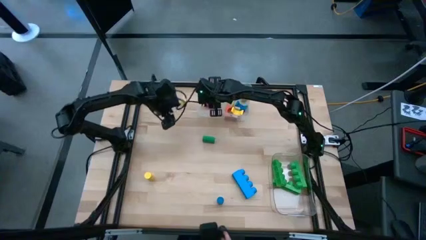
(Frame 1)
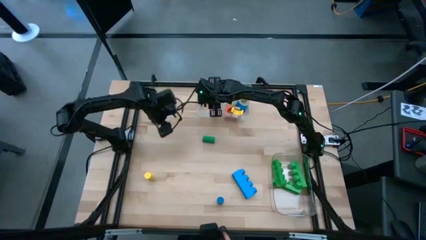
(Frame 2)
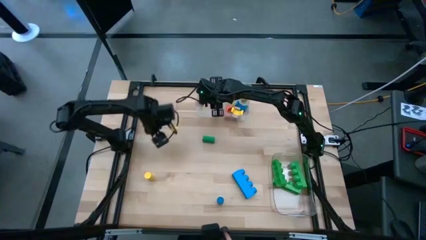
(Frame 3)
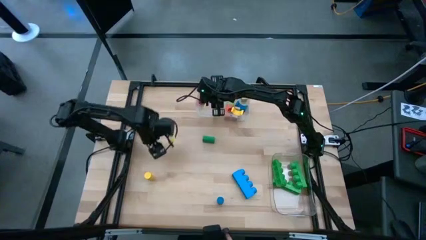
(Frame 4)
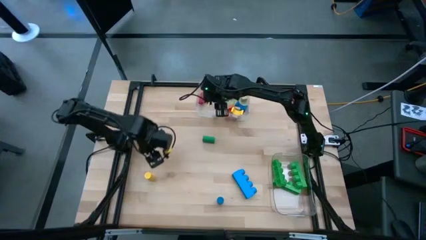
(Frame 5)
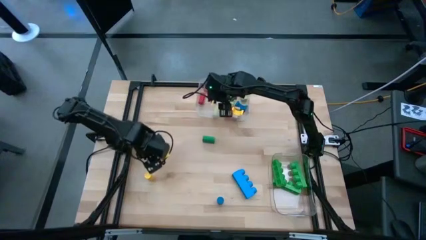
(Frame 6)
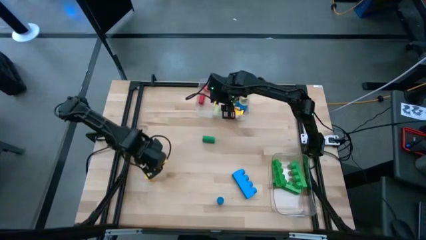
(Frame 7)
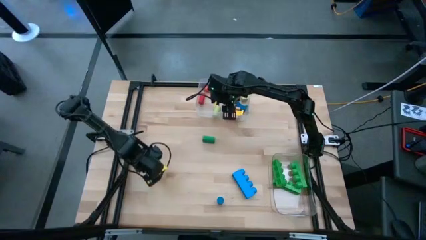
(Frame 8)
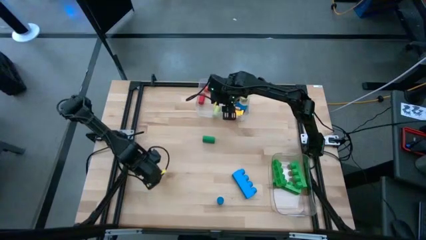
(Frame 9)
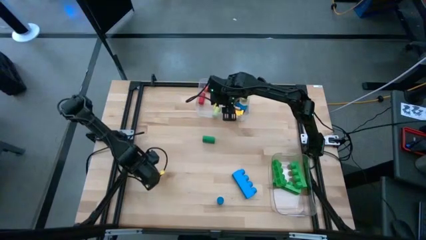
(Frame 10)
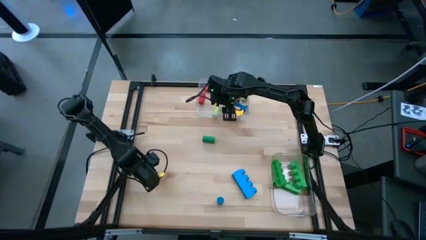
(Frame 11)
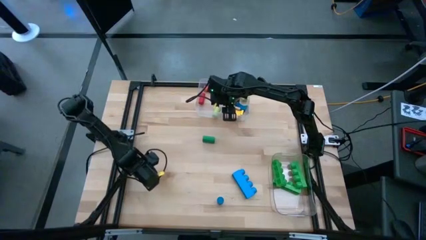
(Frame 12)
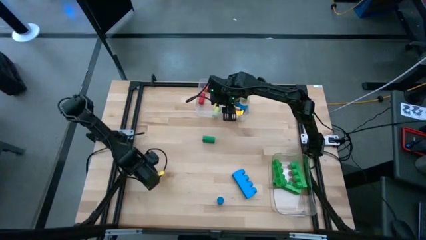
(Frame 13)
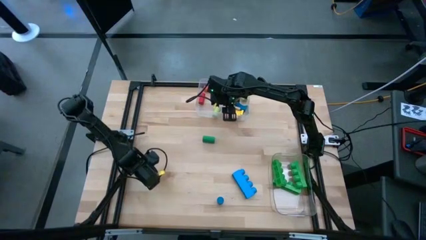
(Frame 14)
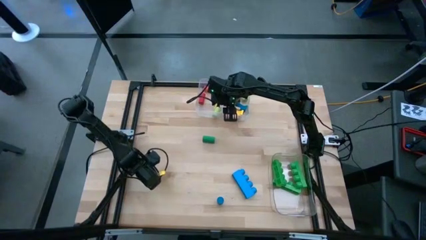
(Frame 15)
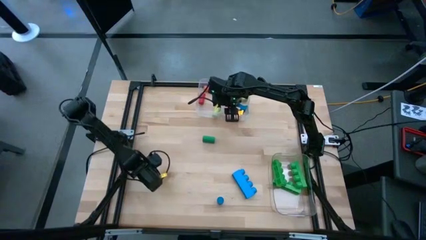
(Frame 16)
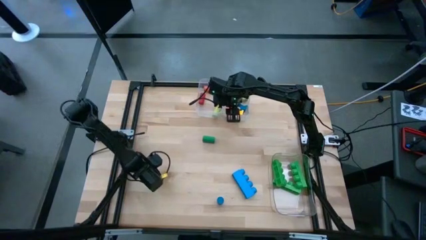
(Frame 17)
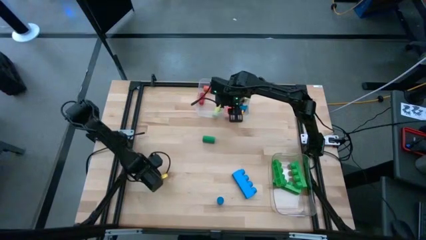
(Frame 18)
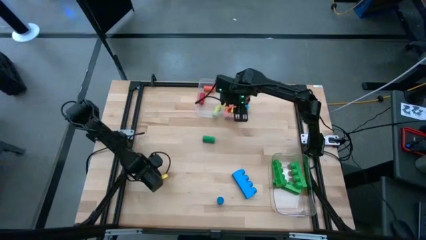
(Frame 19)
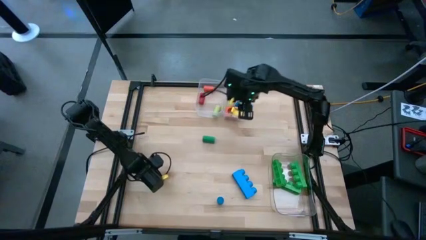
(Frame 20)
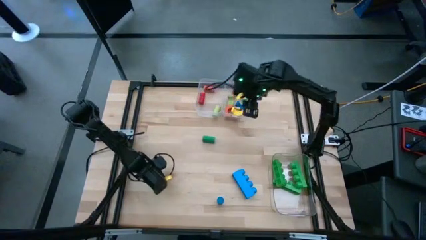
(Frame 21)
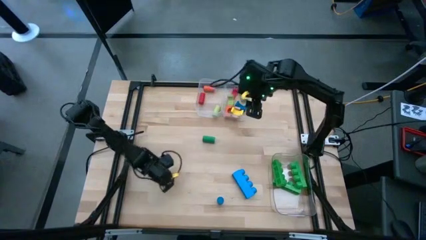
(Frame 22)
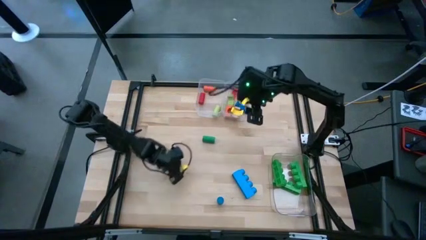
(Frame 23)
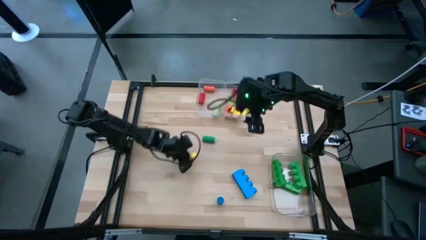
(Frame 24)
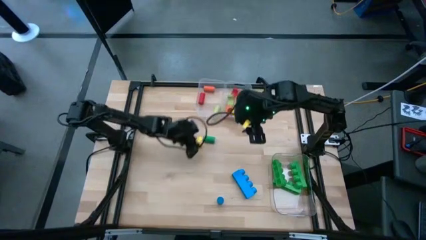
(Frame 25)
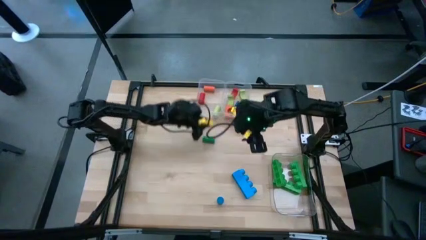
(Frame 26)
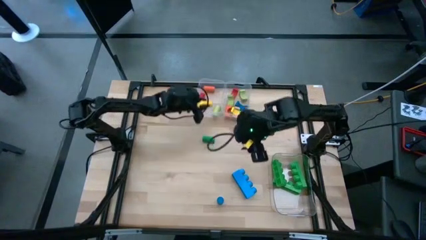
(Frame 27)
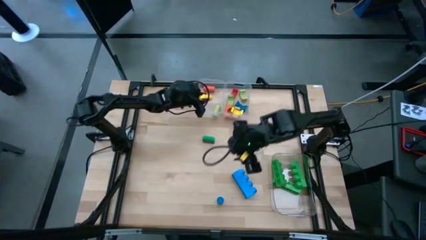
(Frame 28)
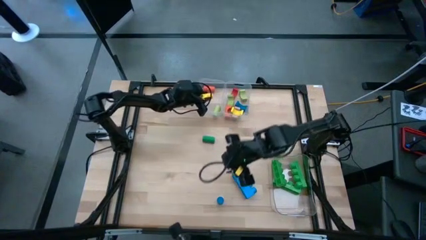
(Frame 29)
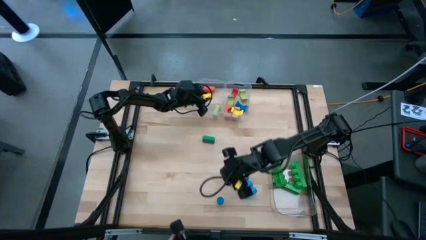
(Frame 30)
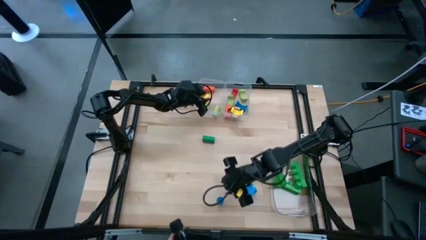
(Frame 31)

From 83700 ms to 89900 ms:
Task: Sort blocks by size
Put the yellow cylindrical block into the left transparent bin

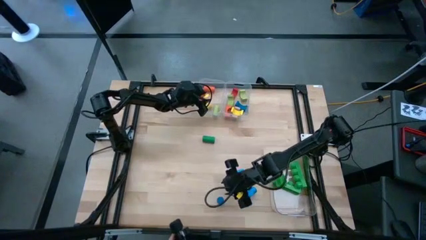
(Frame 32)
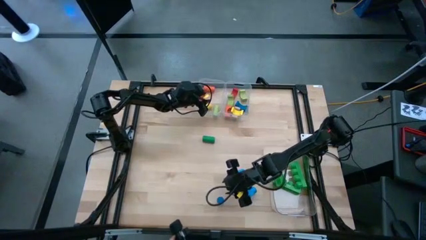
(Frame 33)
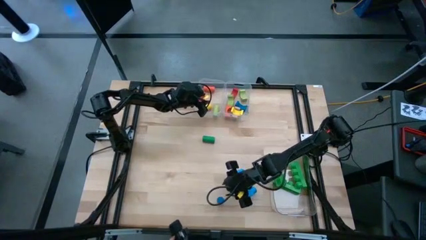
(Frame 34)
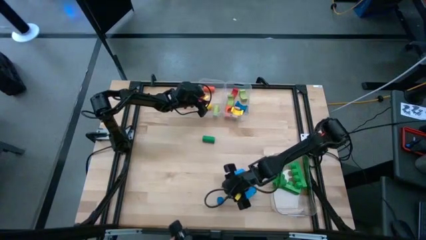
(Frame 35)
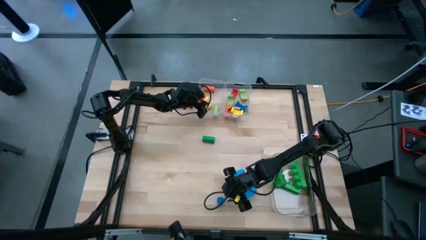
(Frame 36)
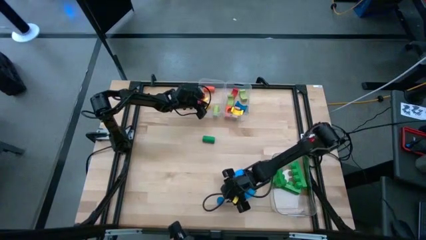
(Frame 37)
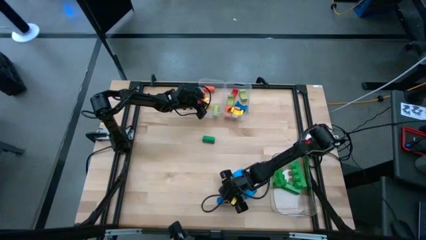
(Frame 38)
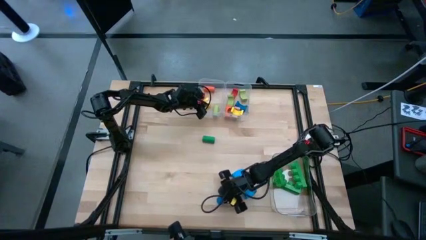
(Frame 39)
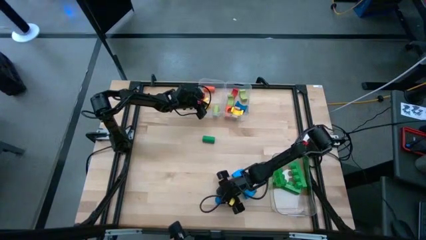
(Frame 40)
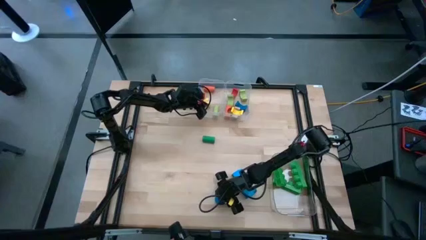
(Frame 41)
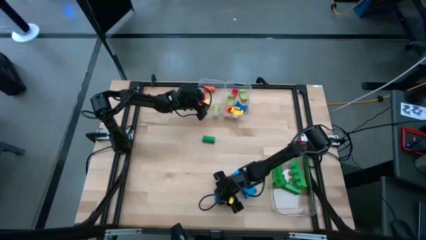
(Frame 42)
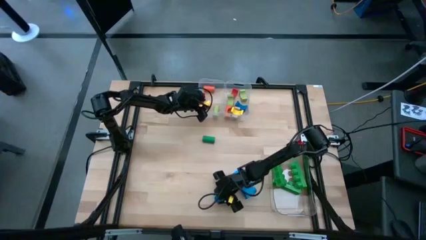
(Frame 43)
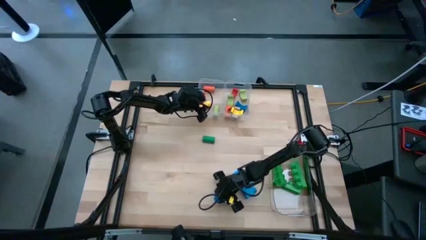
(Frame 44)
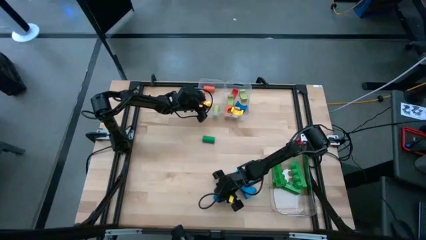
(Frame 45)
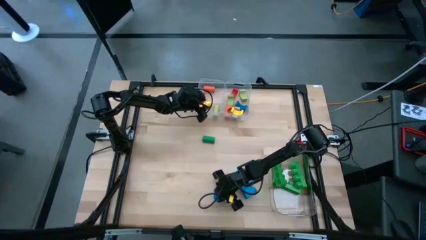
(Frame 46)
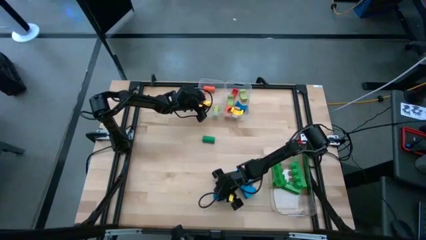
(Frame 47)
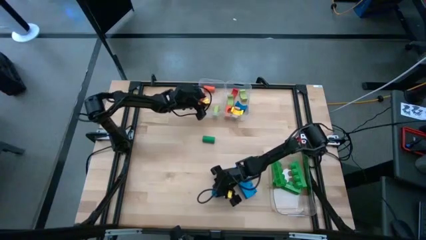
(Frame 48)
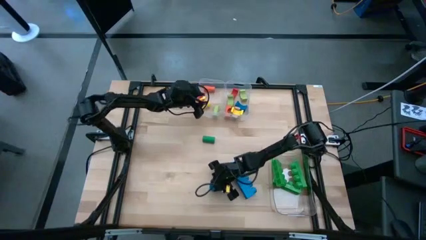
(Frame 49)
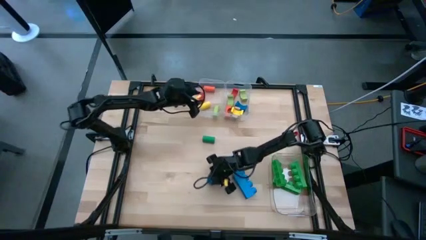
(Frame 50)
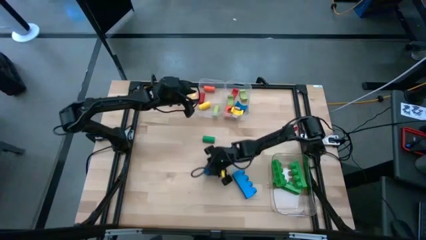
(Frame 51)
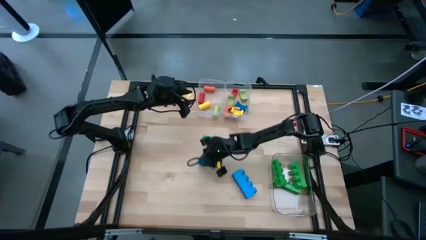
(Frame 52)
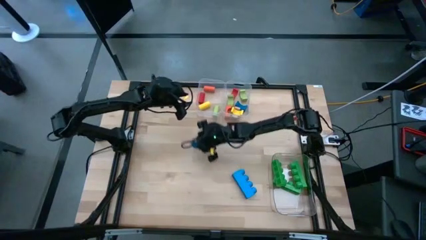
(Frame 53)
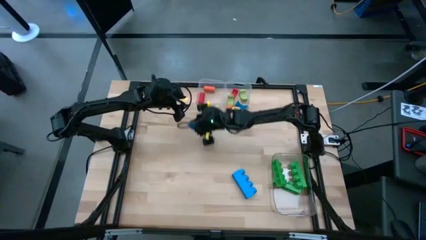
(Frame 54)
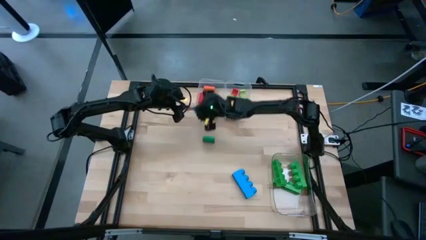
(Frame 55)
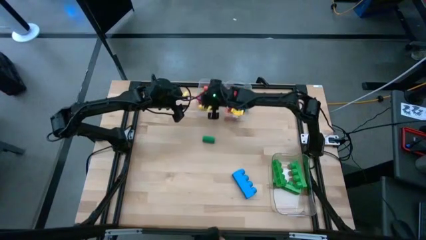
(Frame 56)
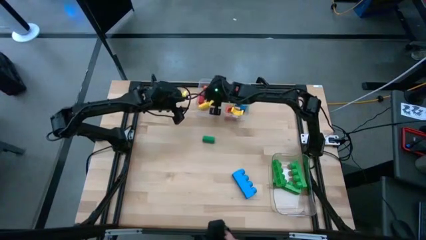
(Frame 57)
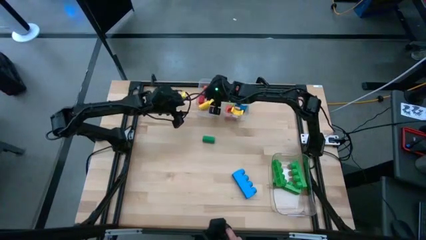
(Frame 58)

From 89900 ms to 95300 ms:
Put the blue cylindrical block into the left transparent bin

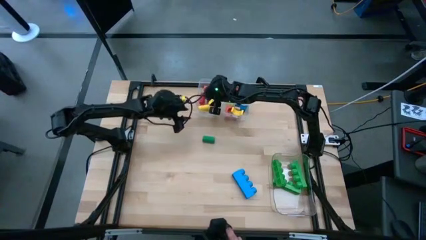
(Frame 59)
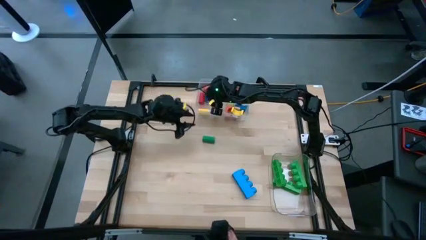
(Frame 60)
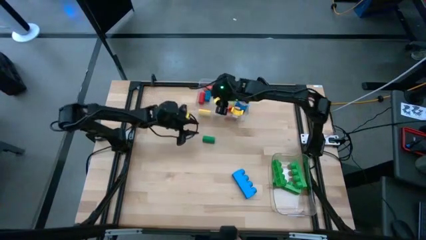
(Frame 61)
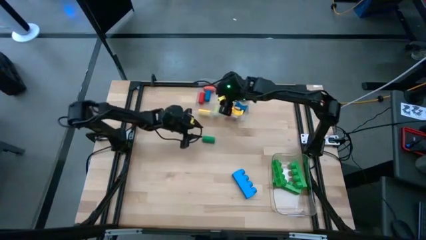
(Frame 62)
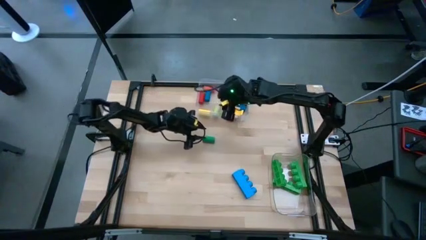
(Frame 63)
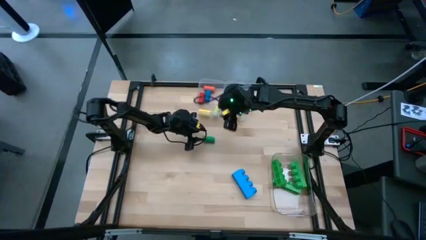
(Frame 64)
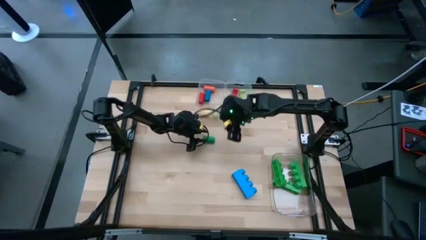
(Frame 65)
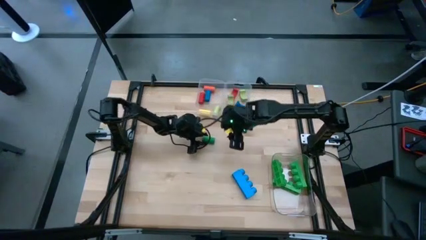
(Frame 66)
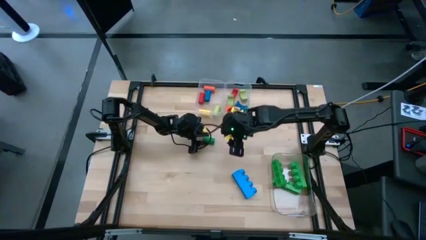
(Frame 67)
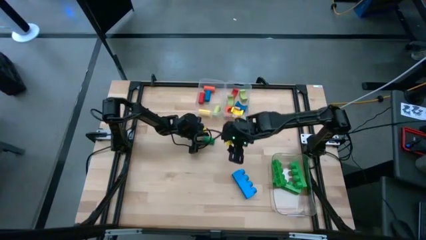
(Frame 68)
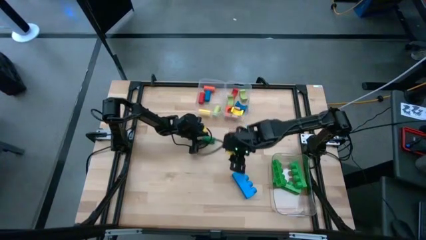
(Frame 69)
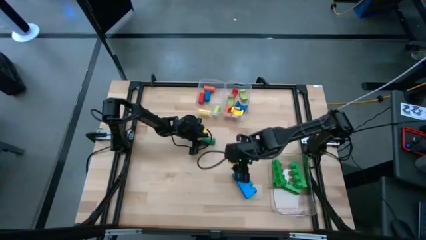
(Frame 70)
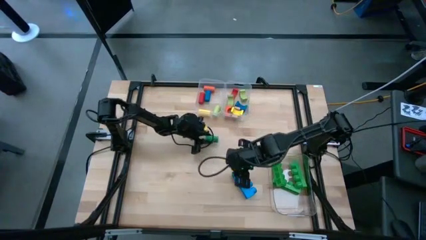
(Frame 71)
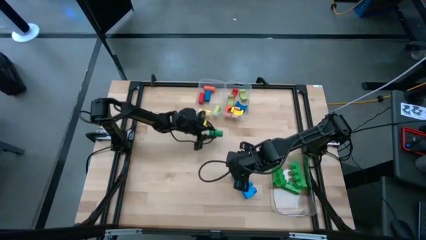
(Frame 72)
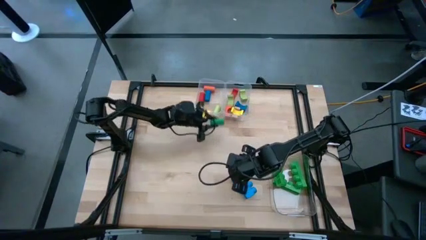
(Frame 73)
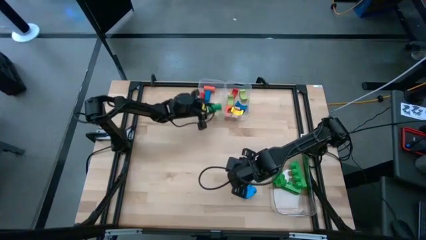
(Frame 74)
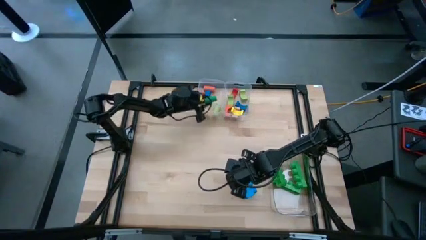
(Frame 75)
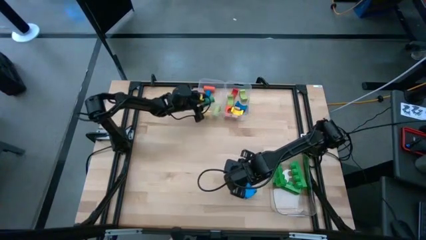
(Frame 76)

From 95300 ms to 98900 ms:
Put the green cylindrical block into the left transparent bin

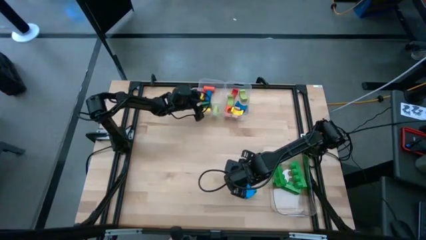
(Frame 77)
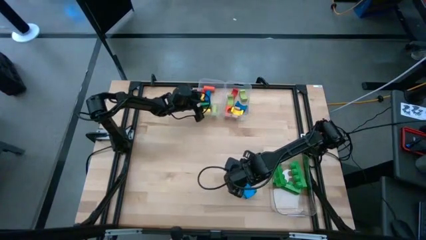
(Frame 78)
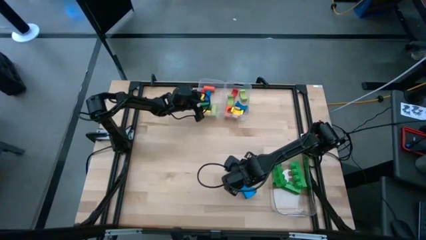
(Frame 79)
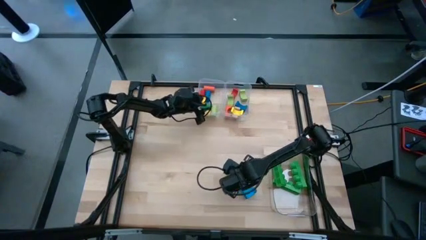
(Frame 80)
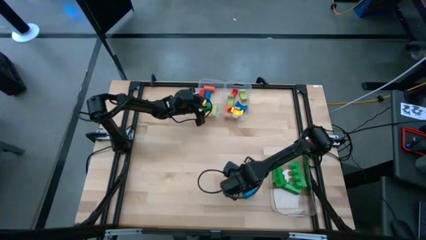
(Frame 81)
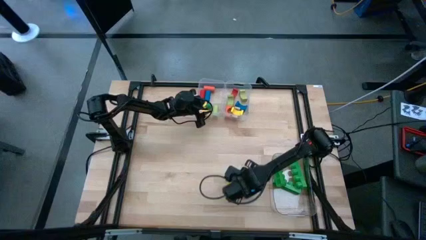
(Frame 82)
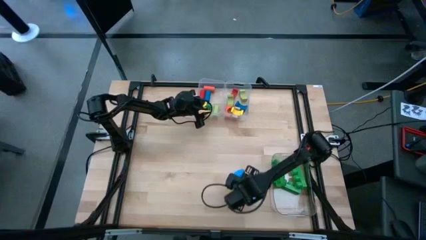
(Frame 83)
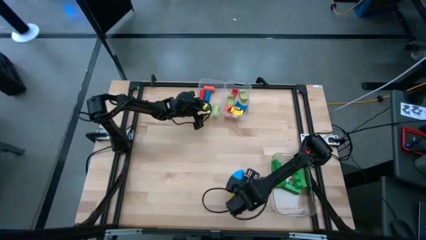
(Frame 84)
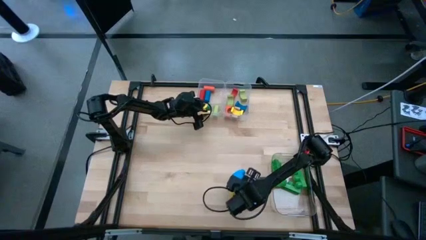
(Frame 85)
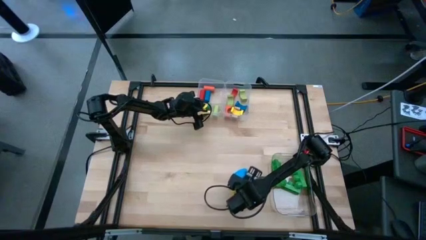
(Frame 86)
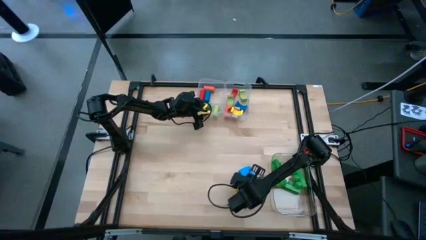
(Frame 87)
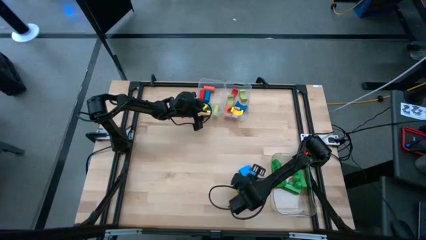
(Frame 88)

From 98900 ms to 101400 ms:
Put the blue 4 stud game piece into the bottom transparent bin
